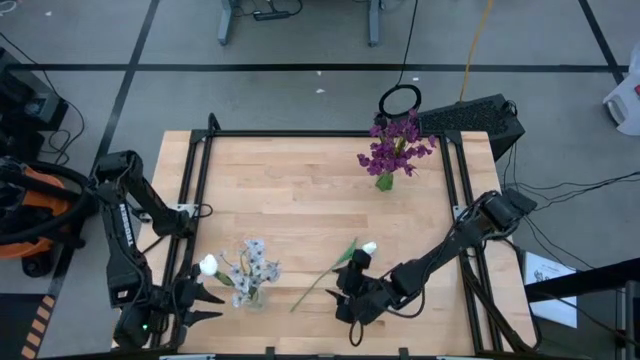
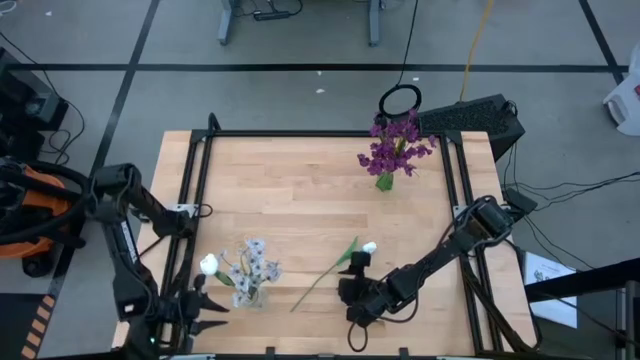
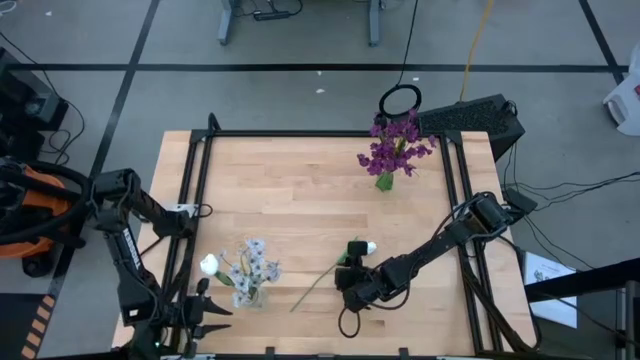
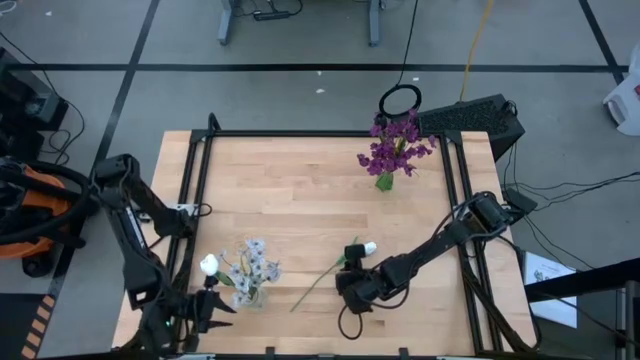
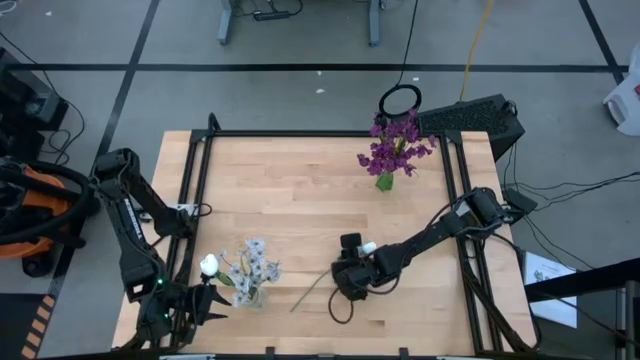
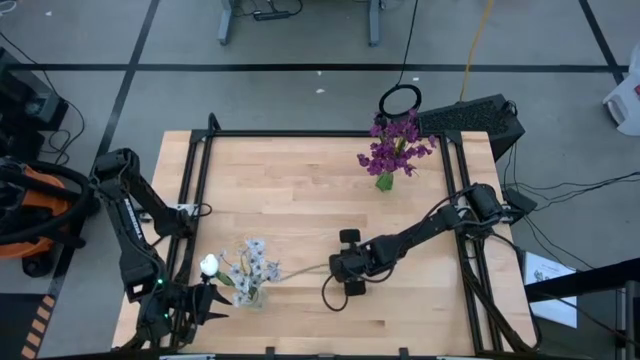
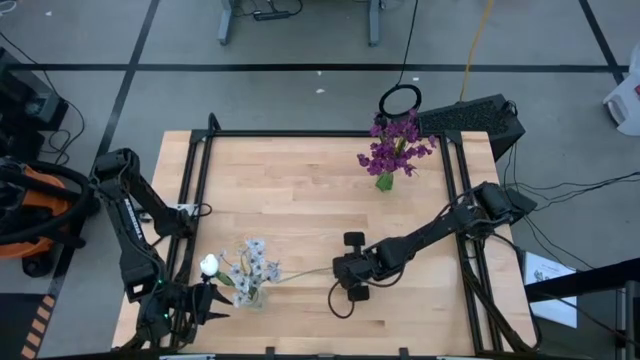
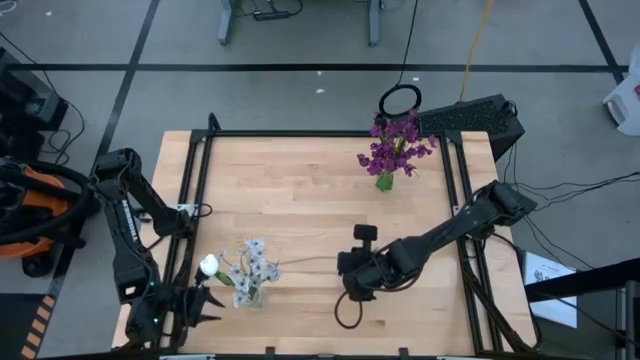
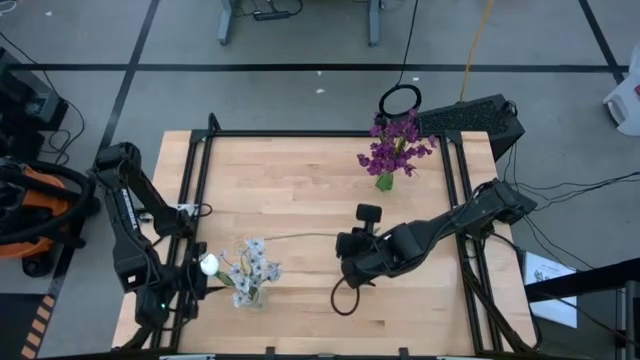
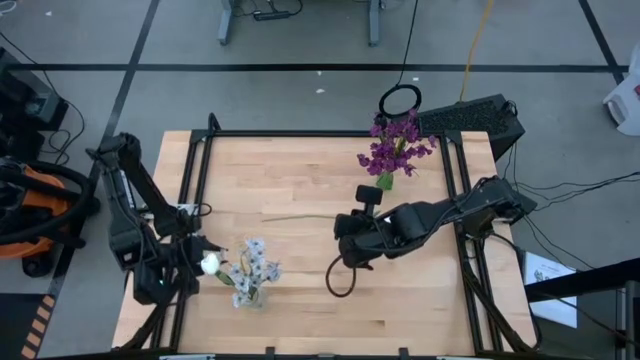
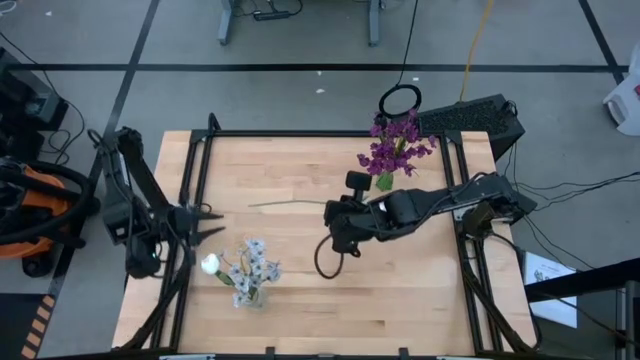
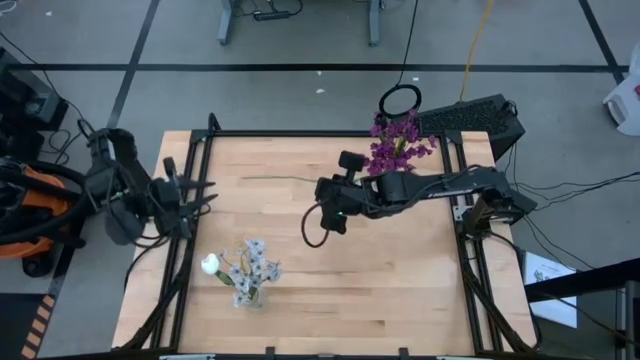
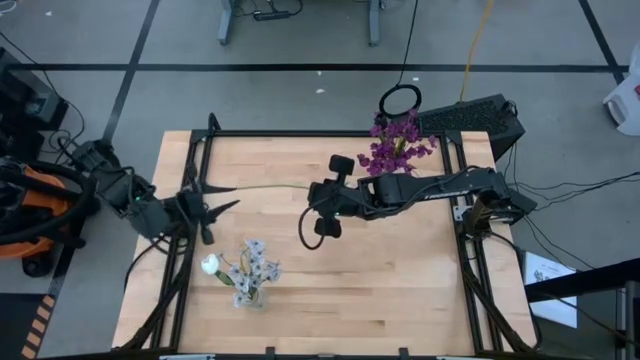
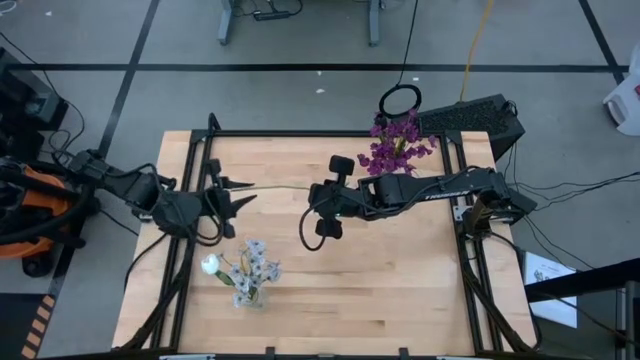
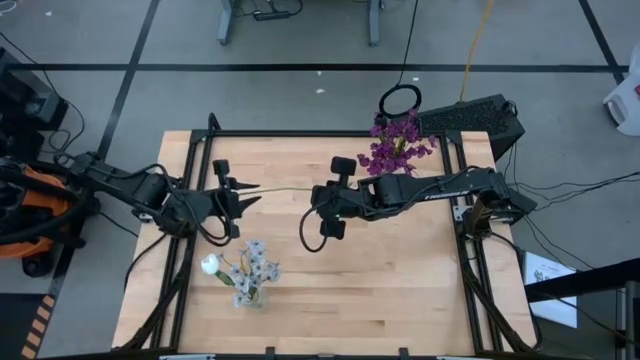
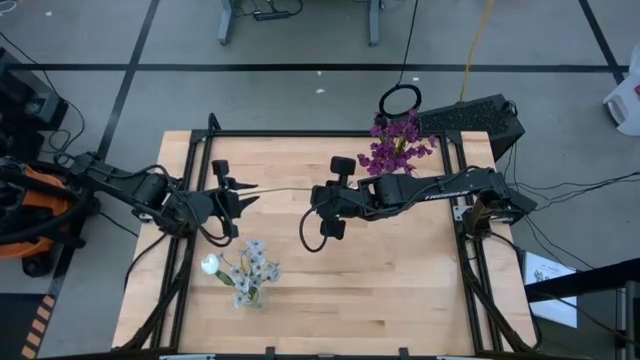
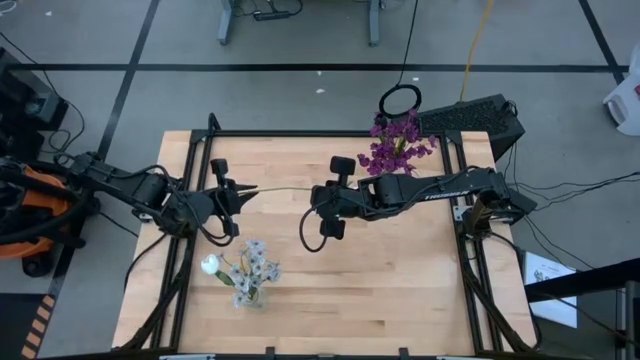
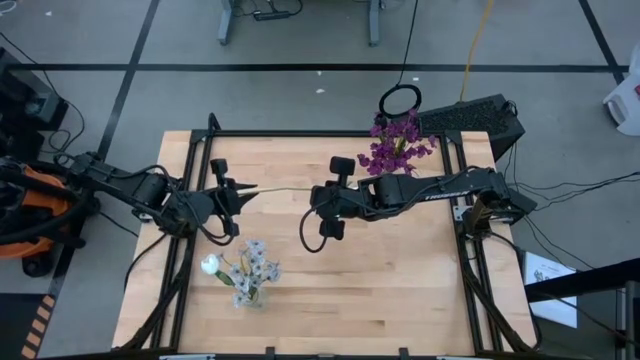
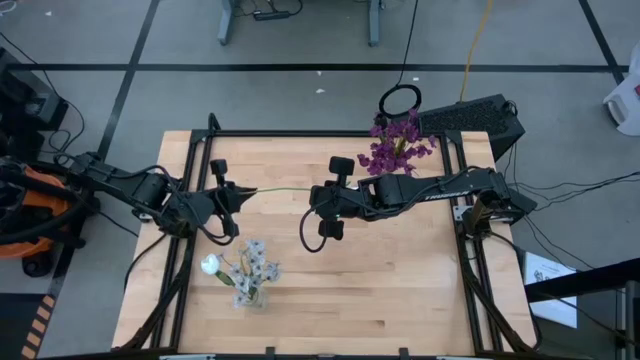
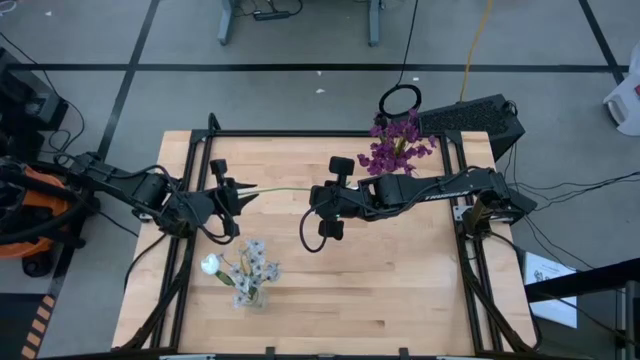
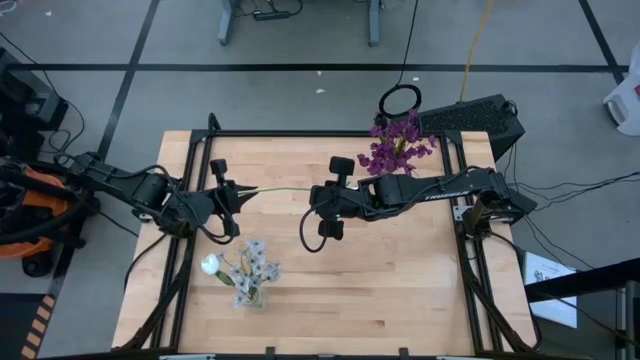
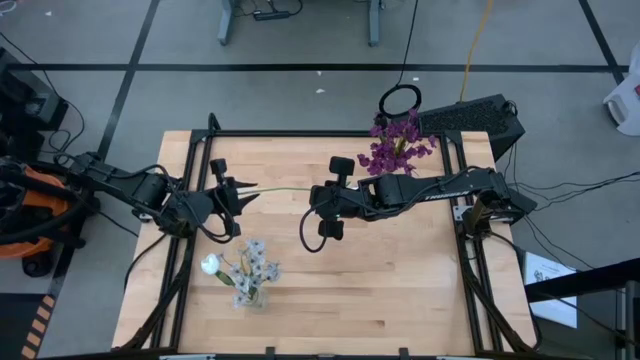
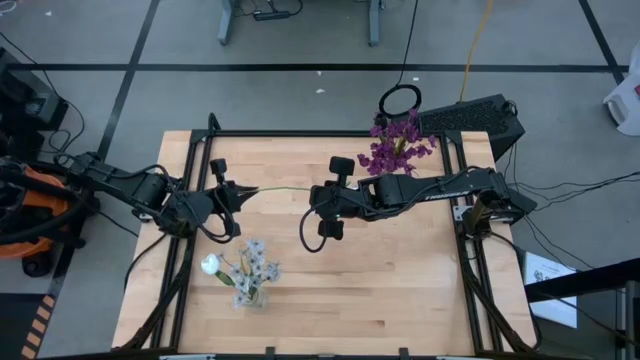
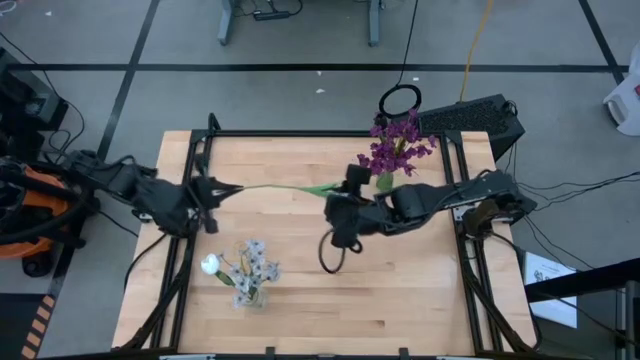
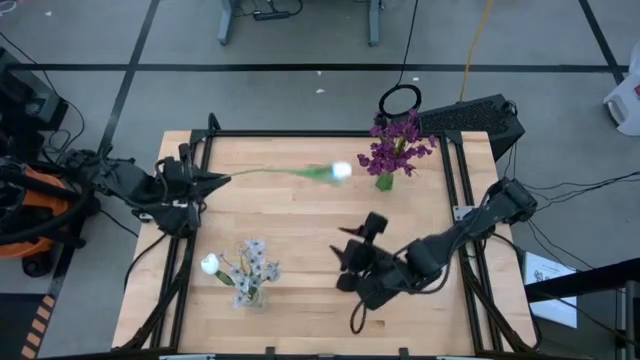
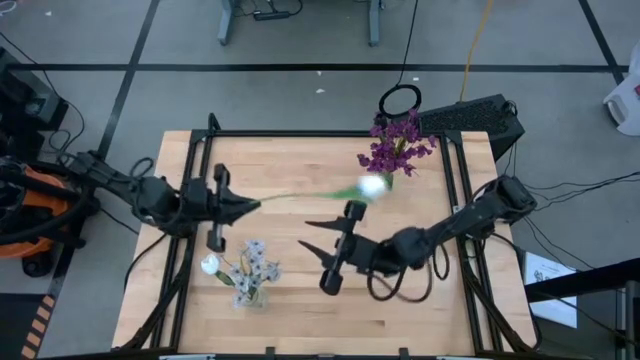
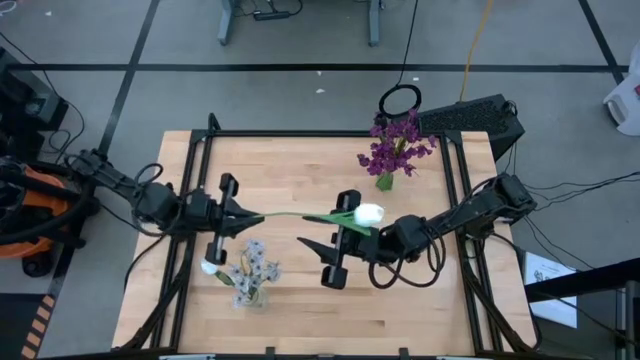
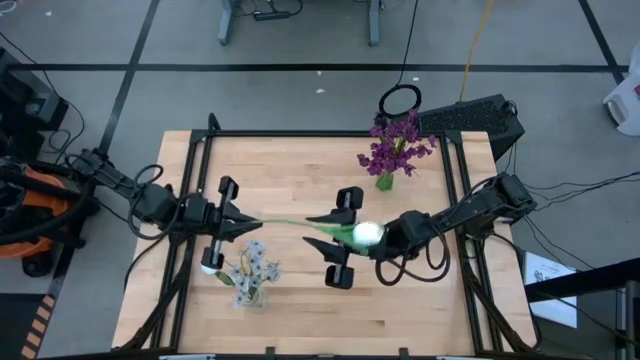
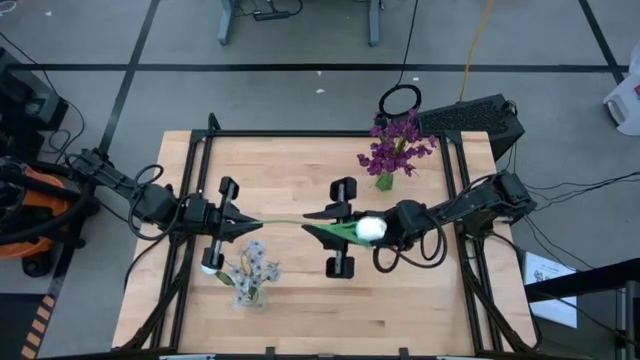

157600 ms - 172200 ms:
Task: Sort flowers into vase by color
Put the white flower into the transparent vase

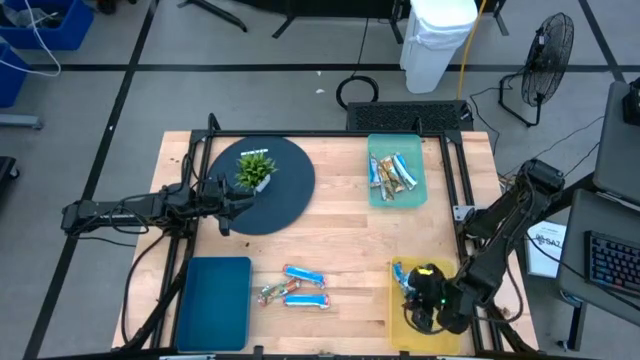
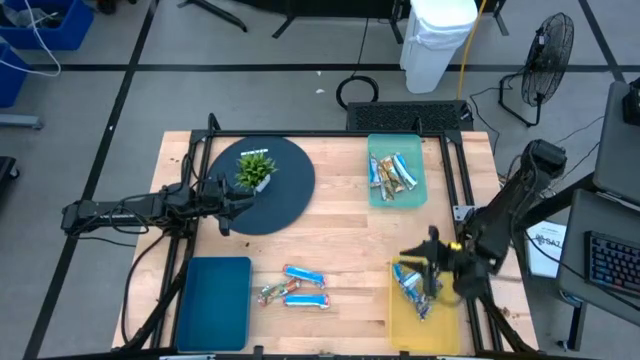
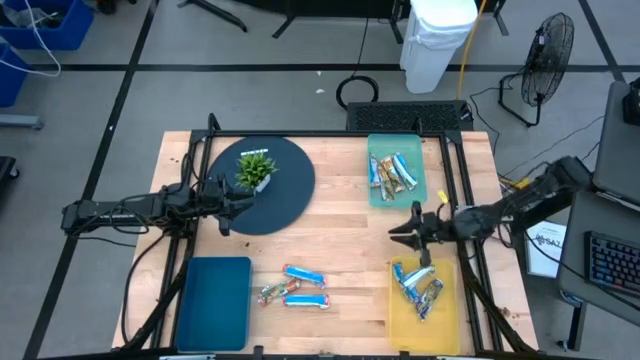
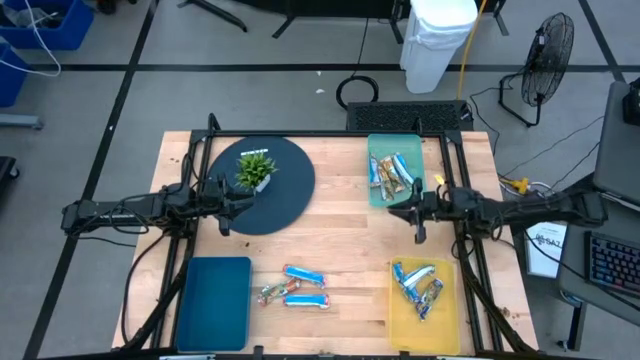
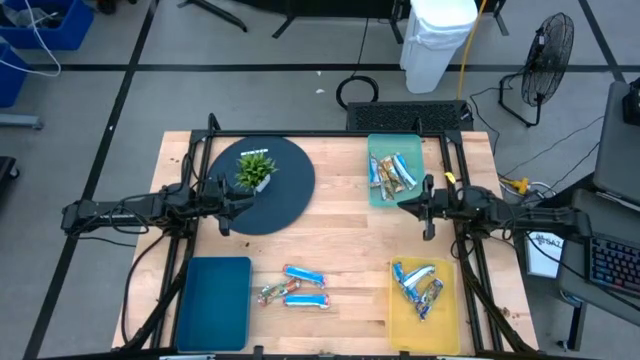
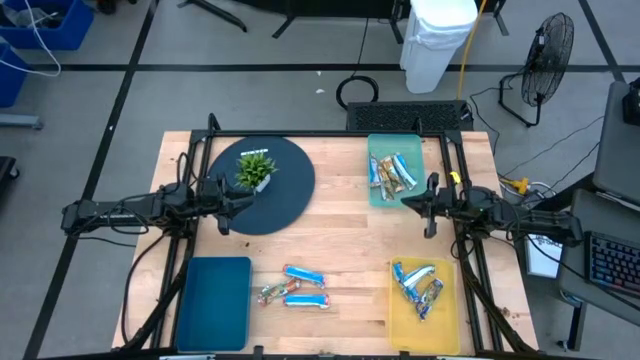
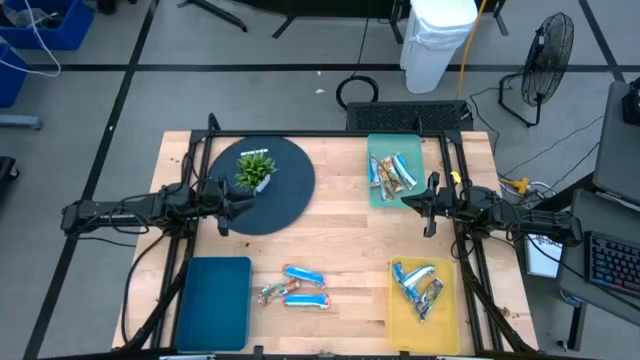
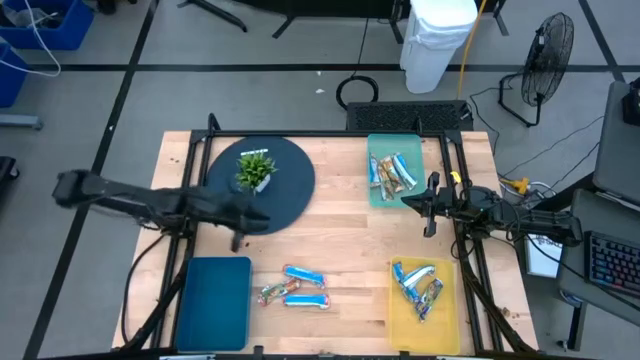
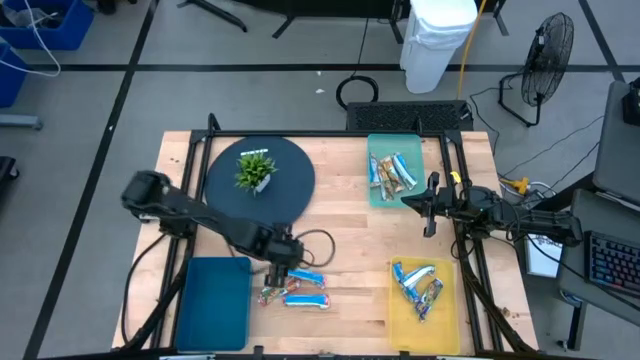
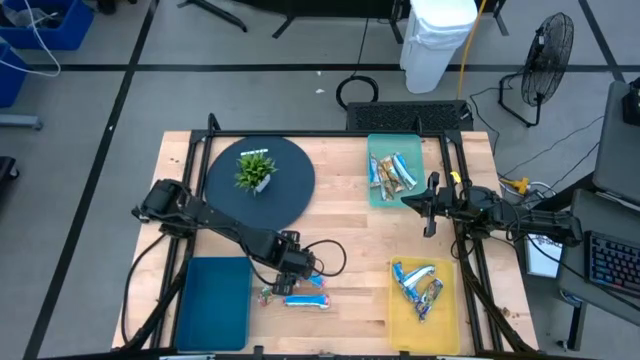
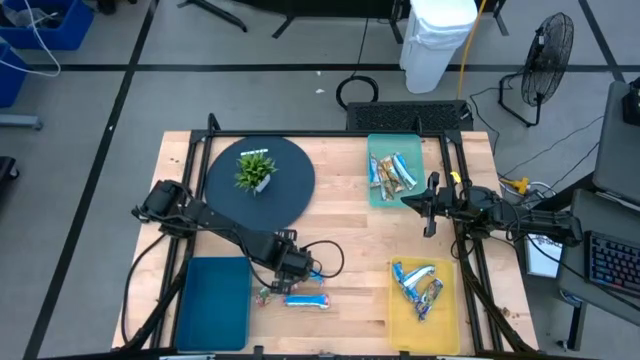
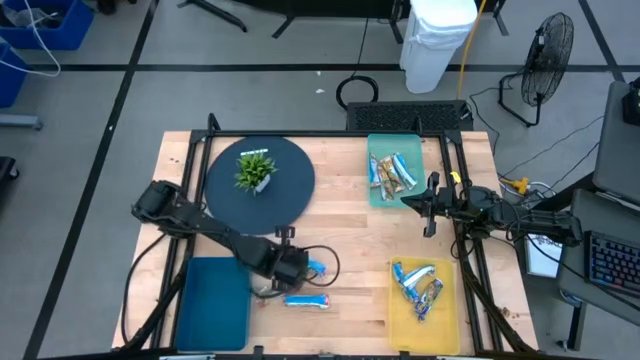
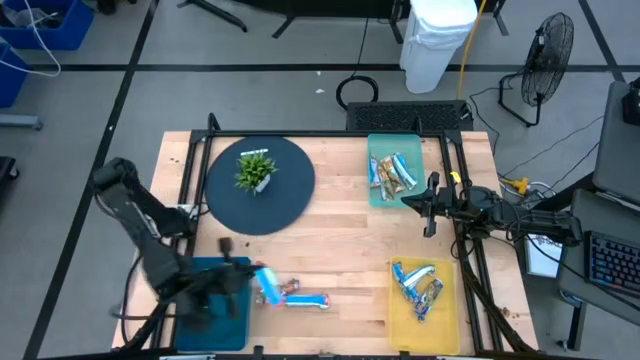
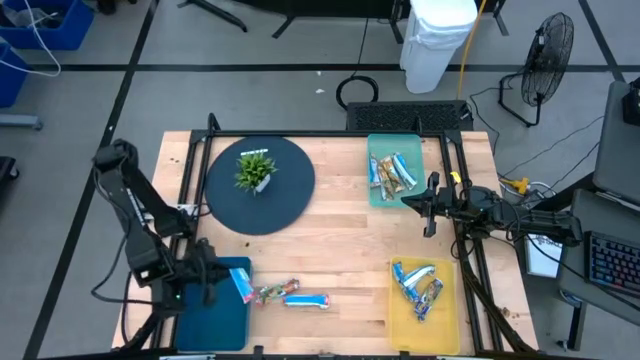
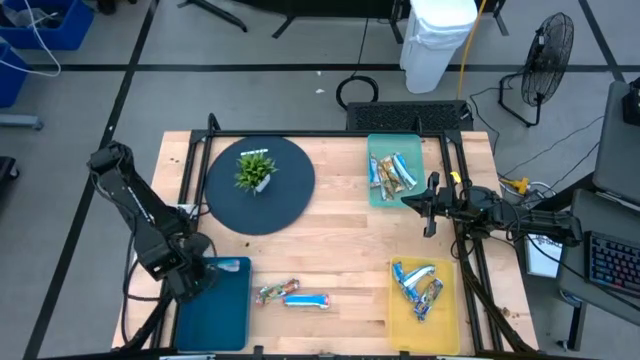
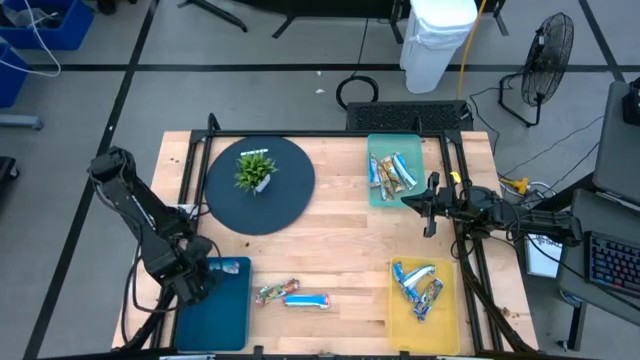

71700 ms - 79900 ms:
Task: Pick and place Granola Bars by type
Put the red granola bar into the blue bin
